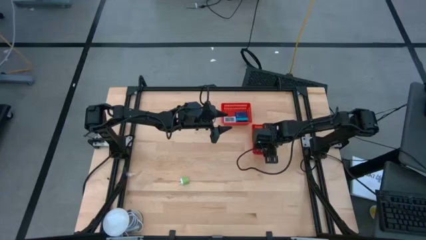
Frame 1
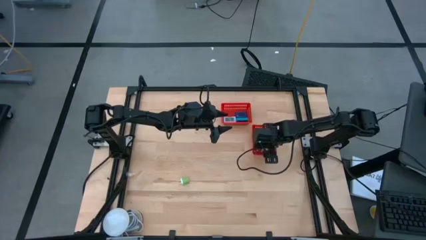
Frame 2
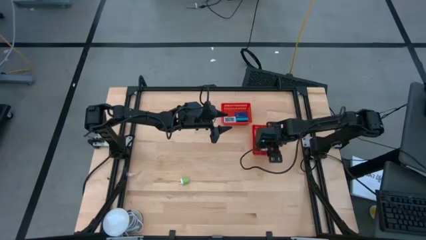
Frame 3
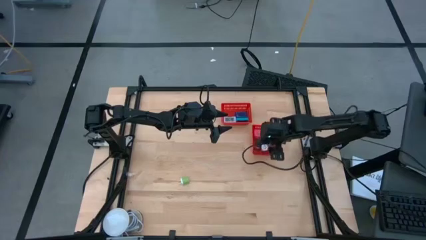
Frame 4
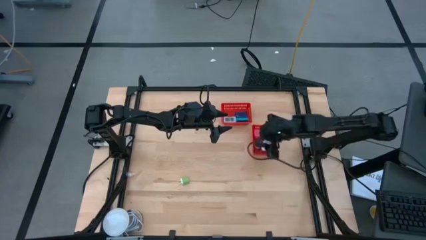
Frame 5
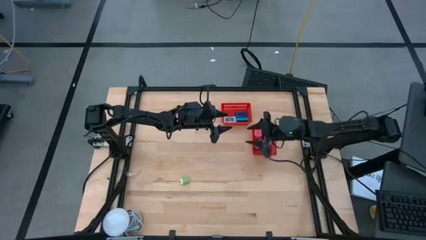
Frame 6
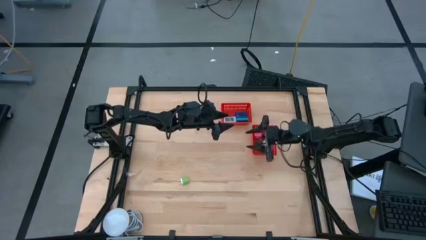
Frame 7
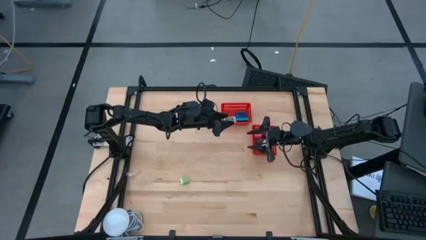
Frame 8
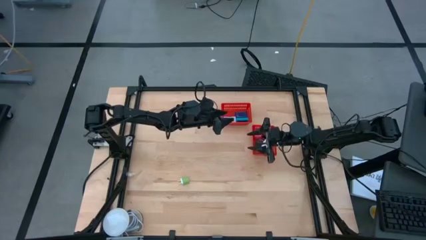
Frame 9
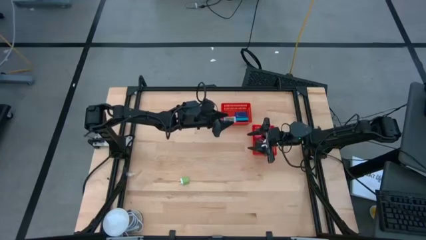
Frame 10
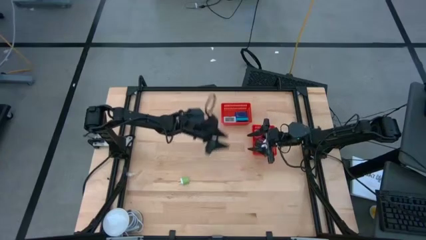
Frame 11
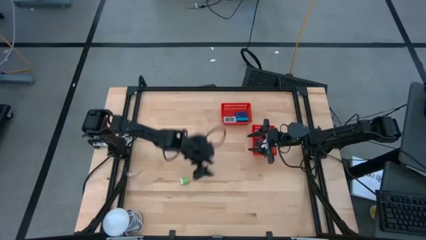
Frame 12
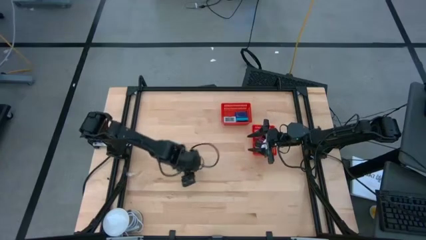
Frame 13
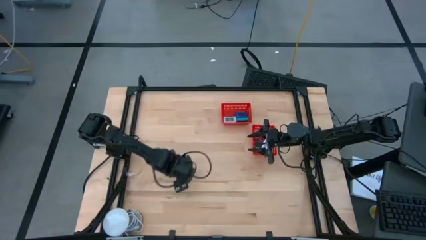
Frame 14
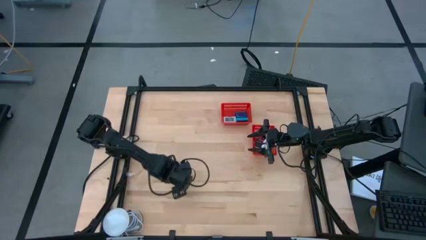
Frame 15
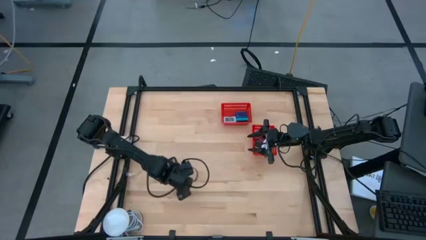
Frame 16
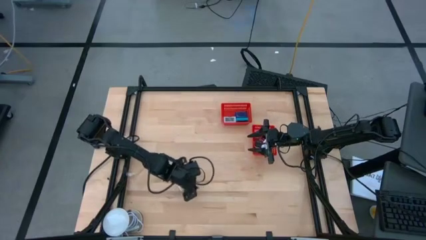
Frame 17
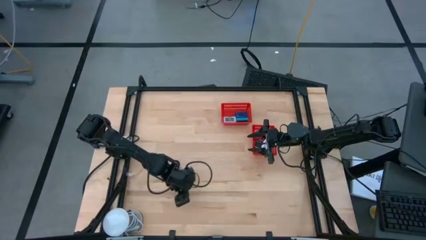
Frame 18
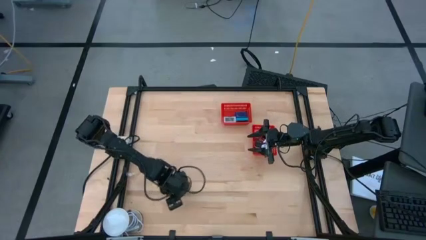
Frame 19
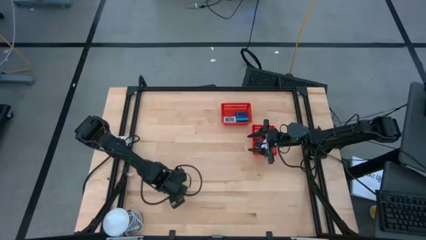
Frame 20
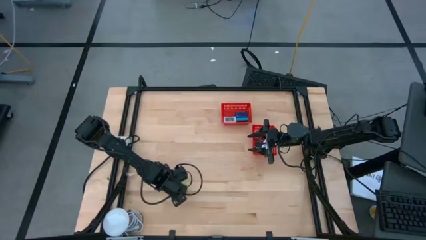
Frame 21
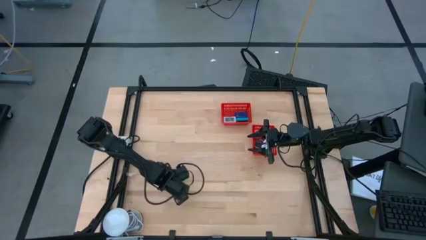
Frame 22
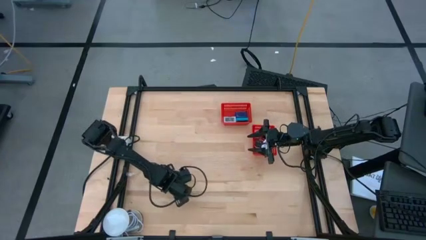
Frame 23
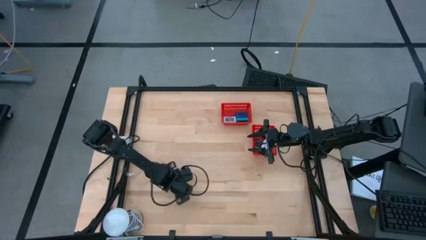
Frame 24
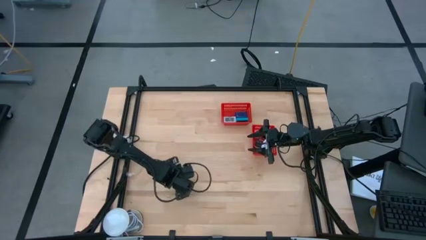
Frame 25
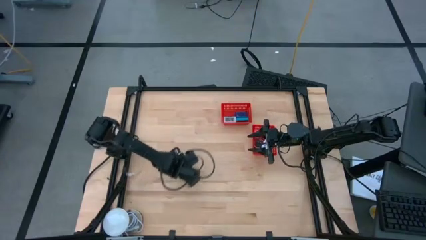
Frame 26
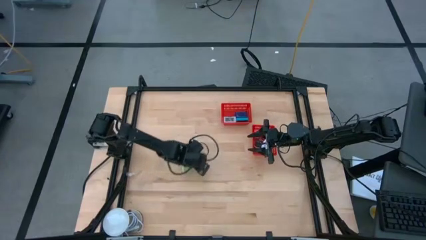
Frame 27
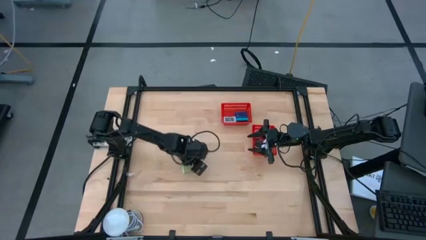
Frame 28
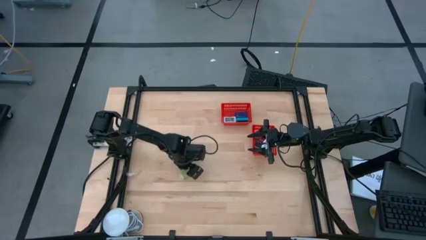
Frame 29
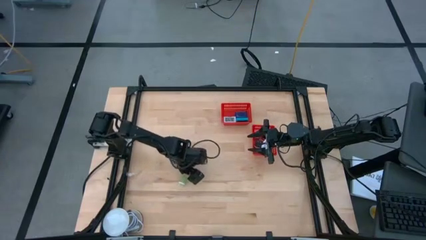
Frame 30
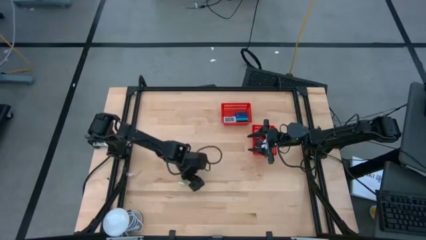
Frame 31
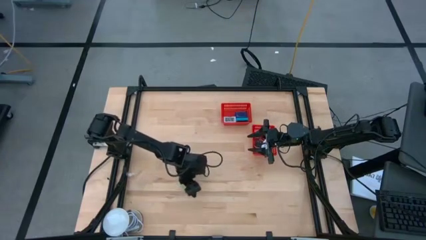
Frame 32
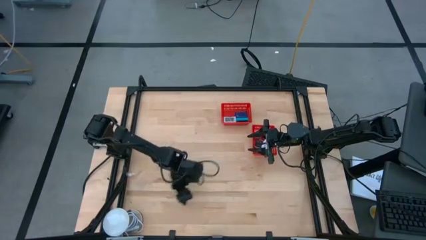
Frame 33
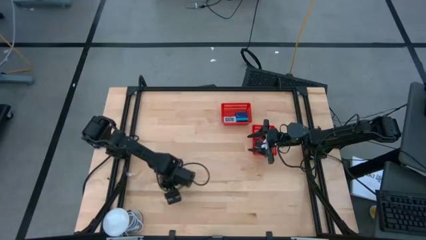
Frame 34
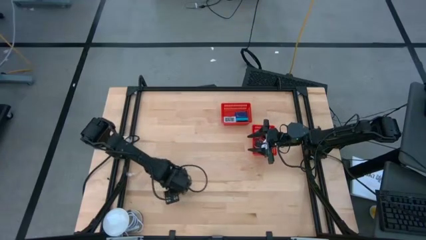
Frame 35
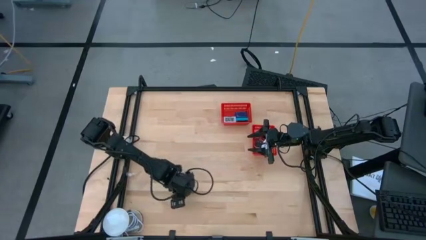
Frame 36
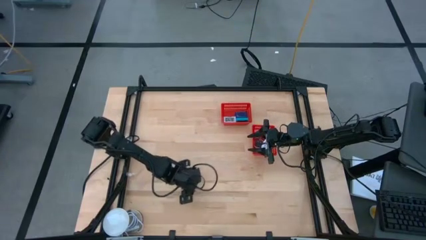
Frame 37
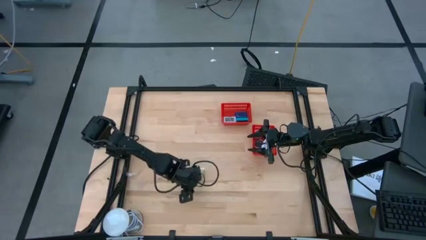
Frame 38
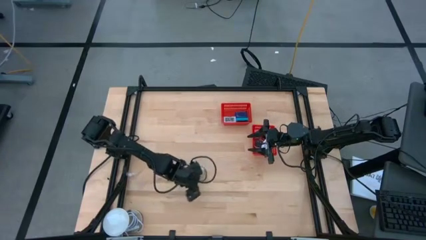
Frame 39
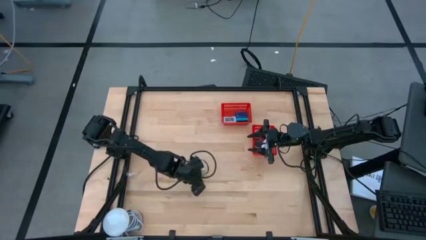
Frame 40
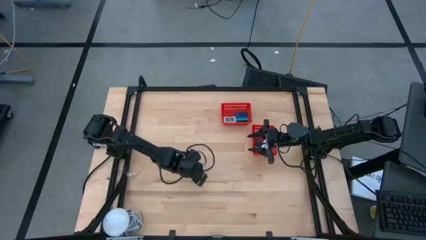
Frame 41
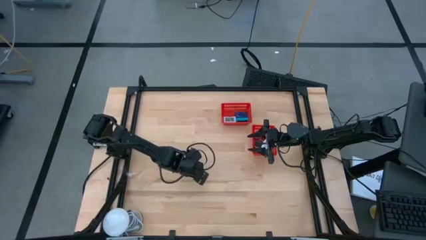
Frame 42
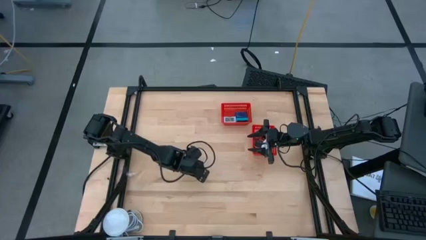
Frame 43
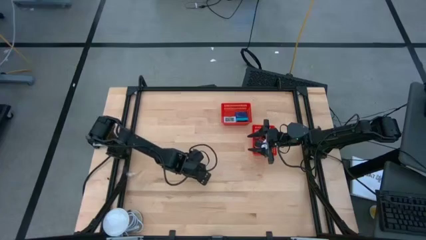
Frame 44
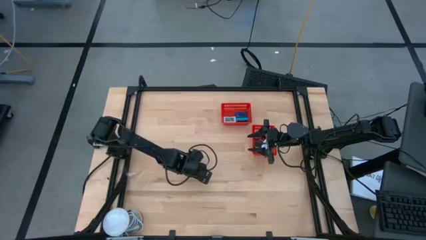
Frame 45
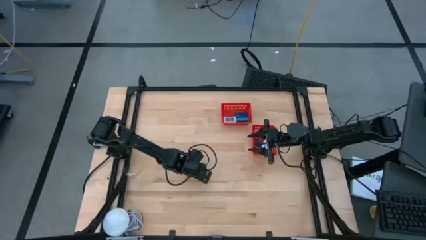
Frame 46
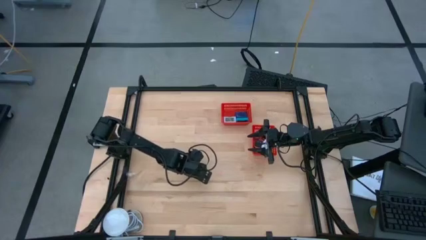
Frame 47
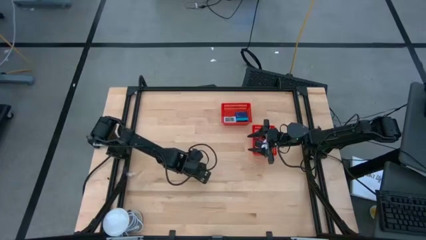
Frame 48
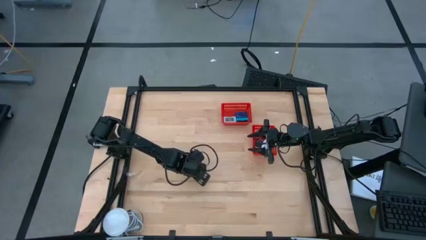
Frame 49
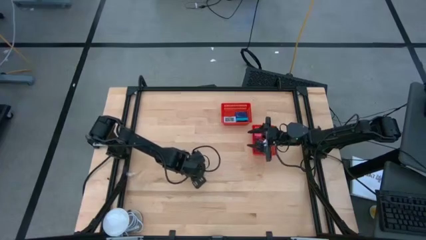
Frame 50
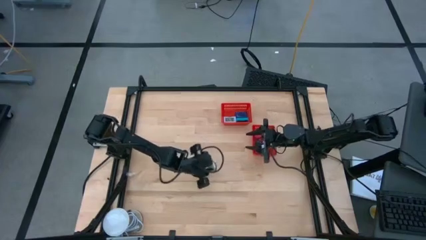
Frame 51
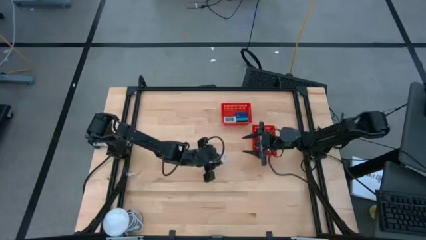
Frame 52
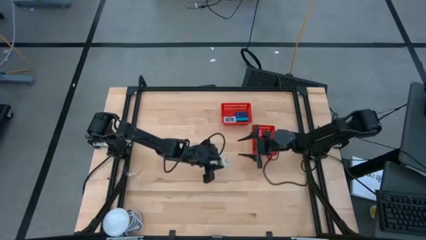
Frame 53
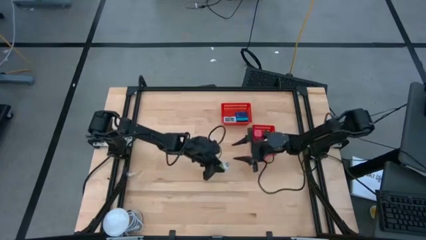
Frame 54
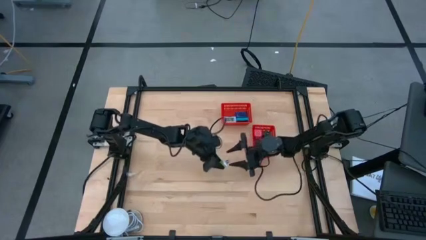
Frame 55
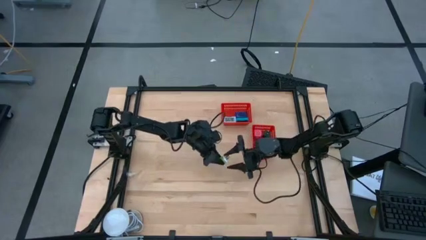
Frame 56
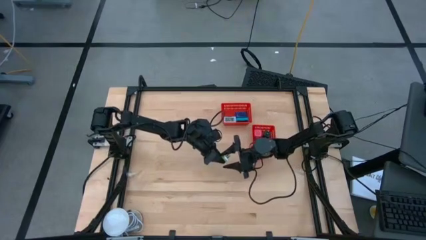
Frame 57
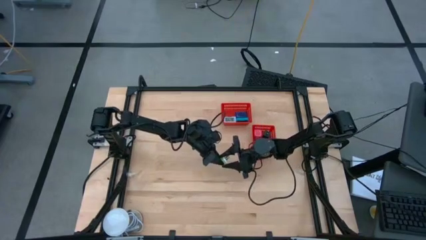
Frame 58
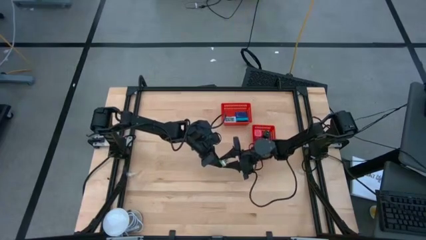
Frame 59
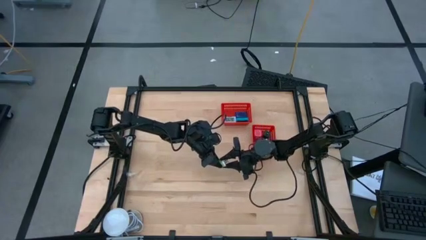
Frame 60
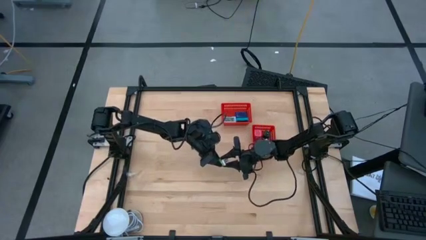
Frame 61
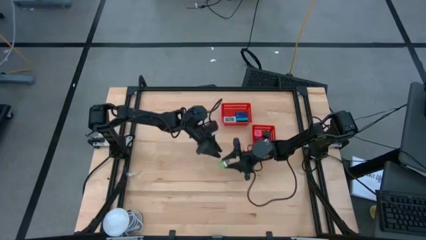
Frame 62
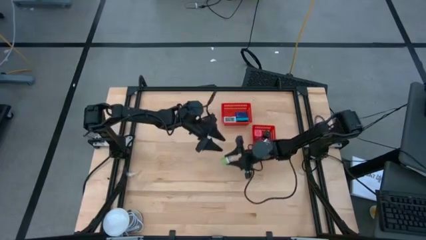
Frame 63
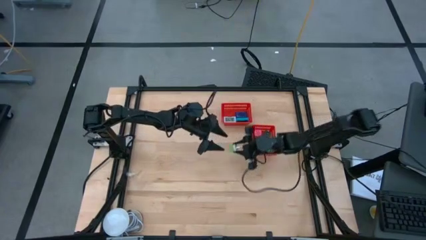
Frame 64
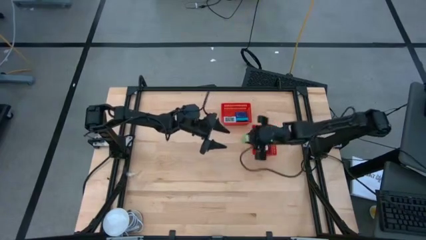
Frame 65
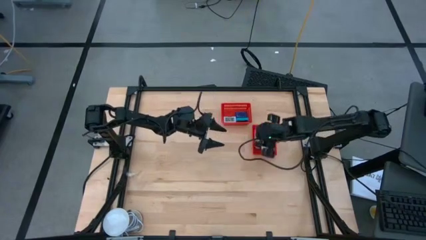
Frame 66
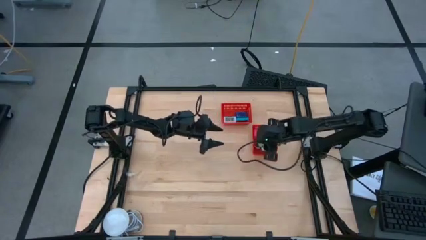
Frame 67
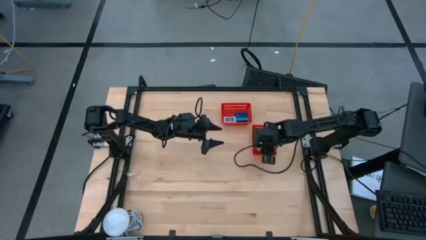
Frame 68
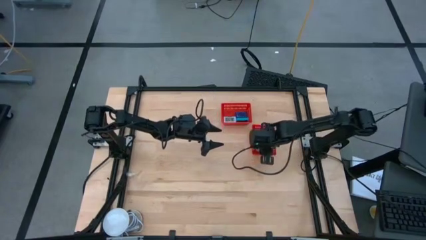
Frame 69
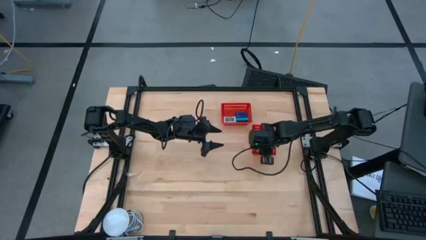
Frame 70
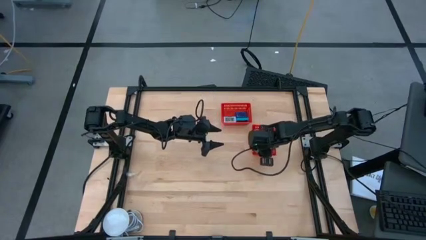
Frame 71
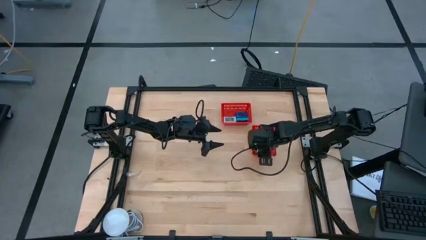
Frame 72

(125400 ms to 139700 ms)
Task: Pick & Place Office items
Put the green charger adapter into the bottom red bin

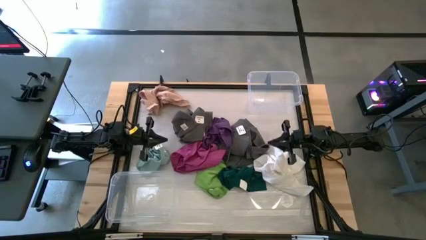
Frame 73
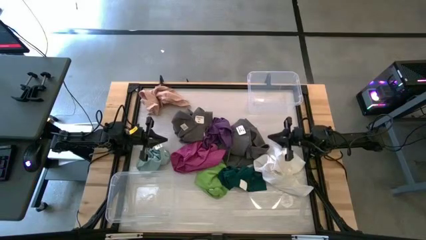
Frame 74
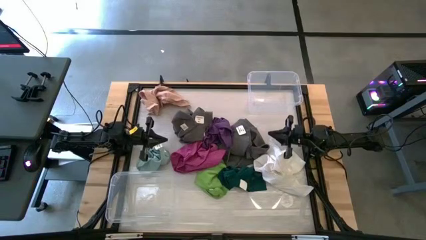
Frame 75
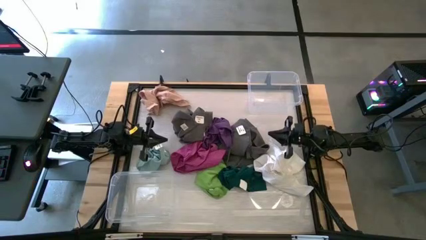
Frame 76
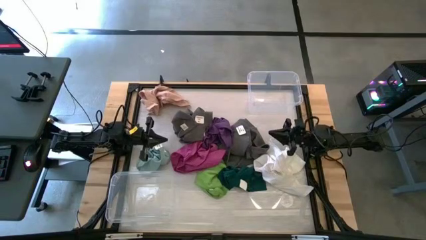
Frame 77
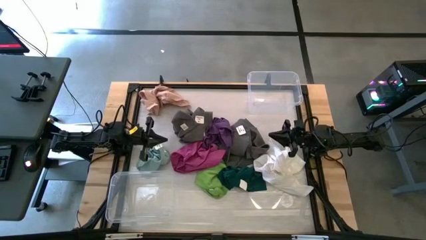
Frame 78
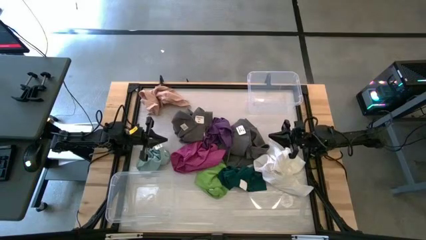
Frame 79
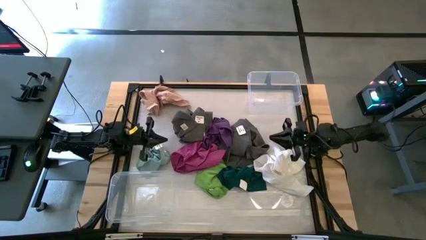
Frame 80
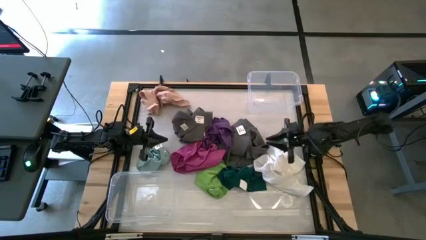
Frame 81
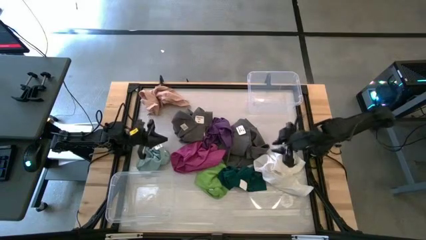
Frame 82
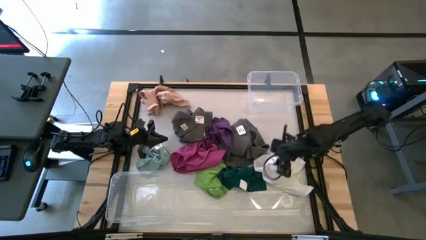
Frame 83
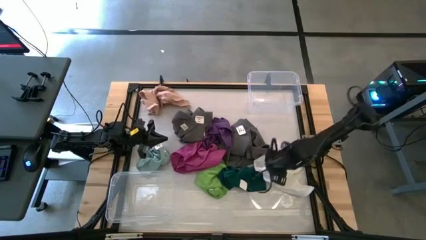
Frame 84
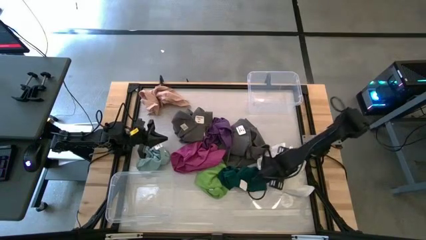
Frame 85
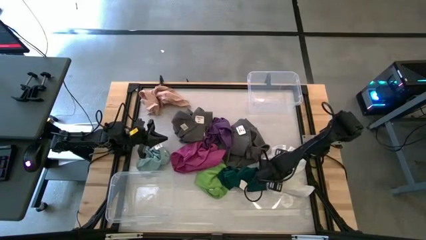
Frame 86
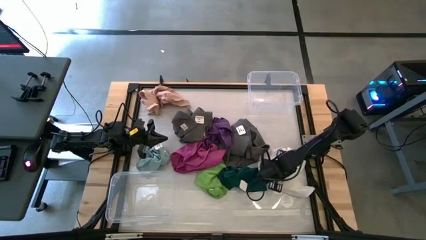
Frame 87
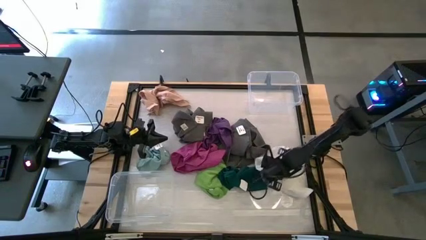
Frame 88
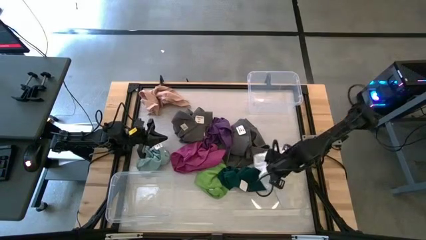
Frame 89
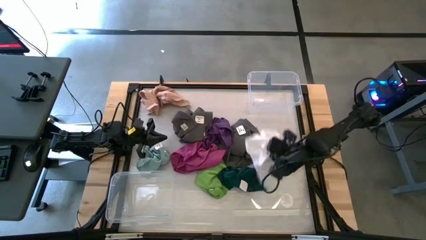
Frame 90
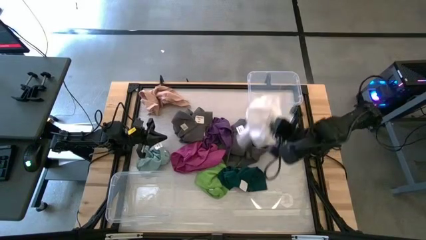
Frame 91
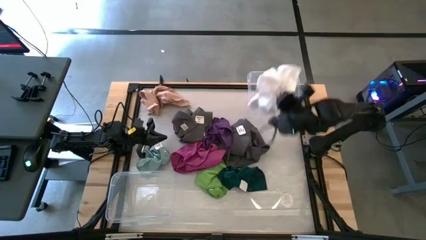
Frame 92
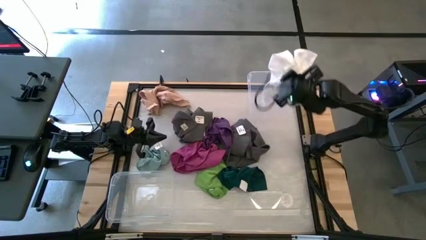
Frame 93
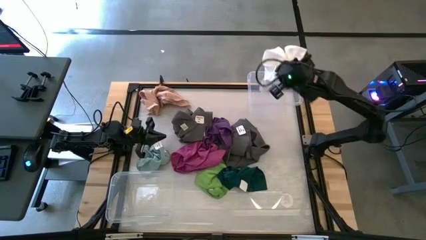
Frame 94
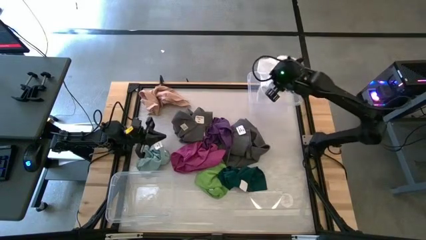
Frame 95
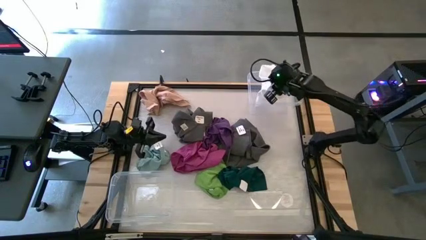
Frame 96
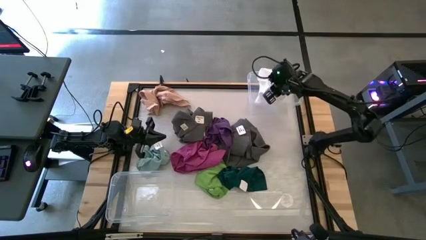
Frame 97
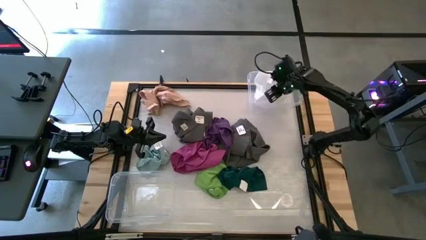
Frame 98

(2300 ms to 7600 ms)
Task: Sort towels by color in basket
Put the white towel into the top transparent bin
